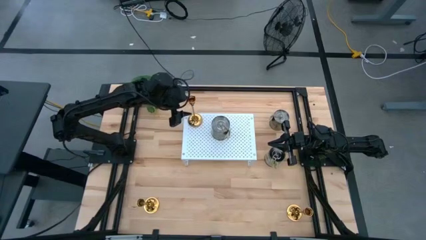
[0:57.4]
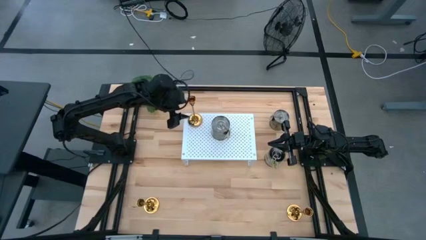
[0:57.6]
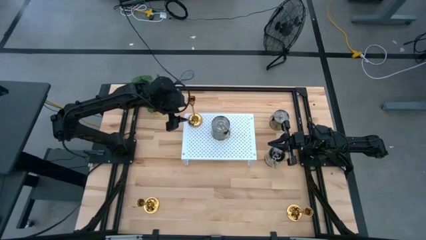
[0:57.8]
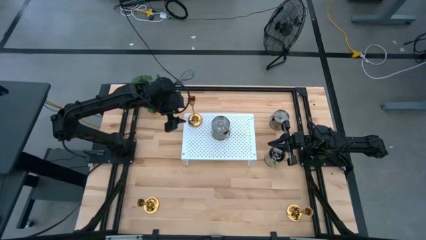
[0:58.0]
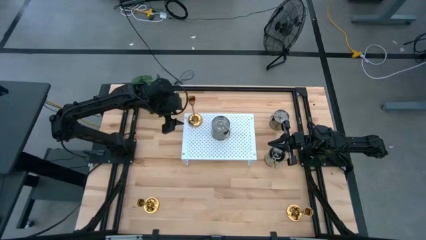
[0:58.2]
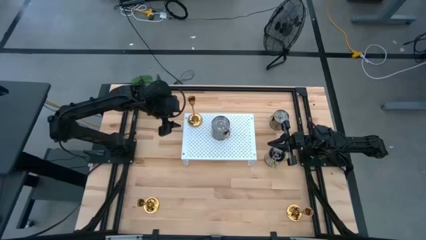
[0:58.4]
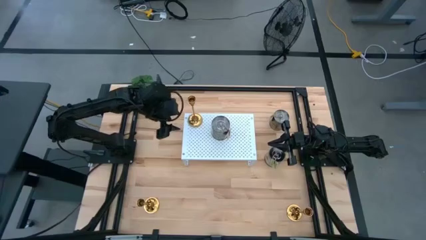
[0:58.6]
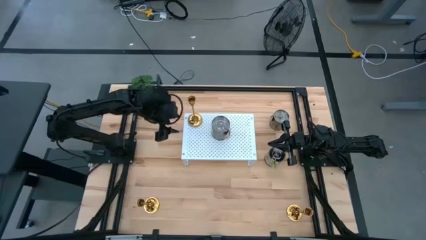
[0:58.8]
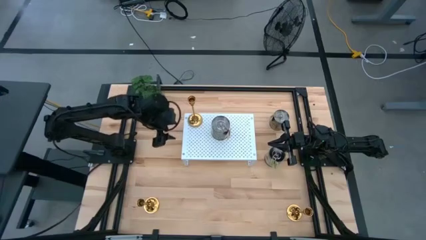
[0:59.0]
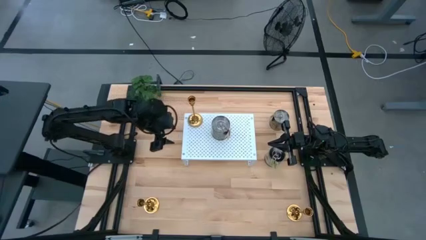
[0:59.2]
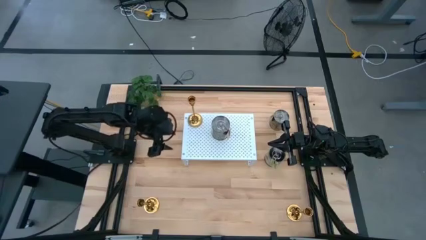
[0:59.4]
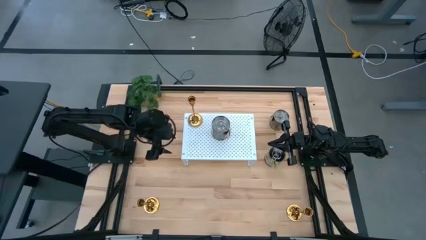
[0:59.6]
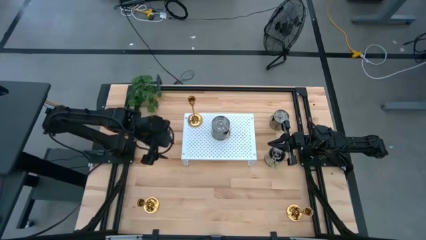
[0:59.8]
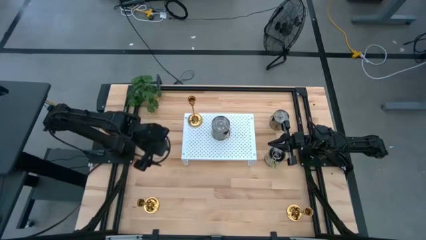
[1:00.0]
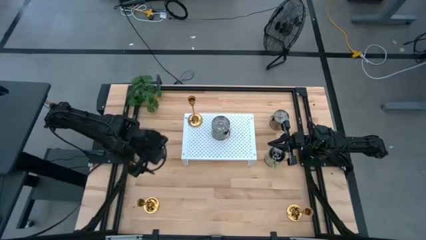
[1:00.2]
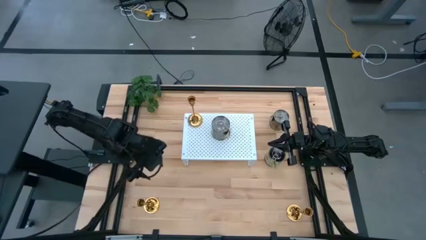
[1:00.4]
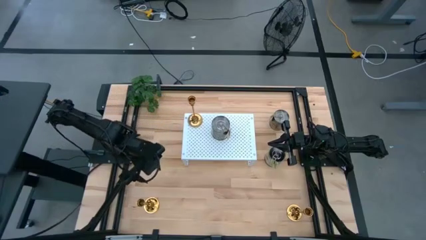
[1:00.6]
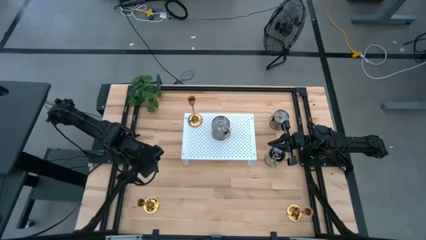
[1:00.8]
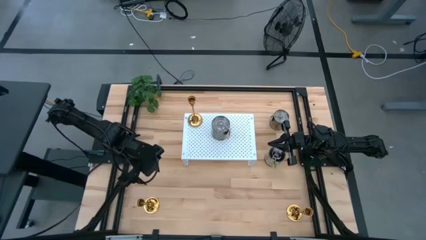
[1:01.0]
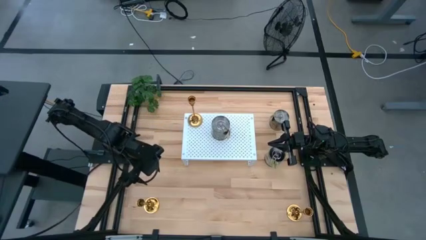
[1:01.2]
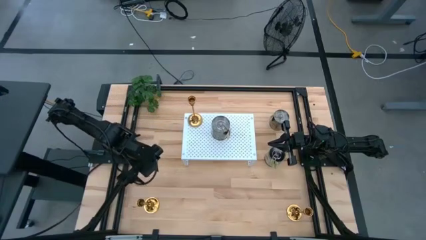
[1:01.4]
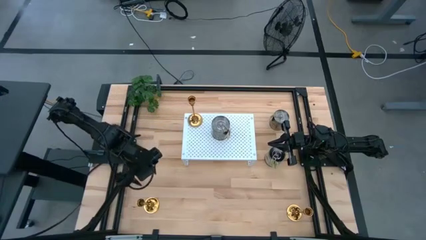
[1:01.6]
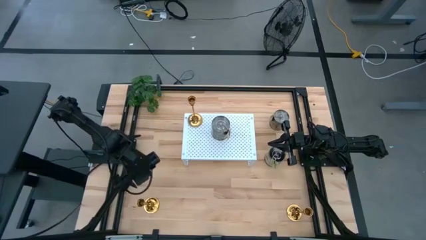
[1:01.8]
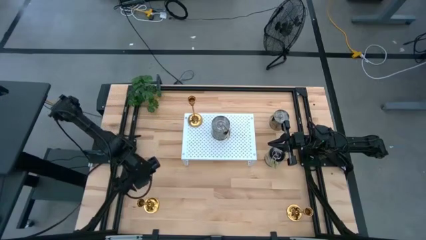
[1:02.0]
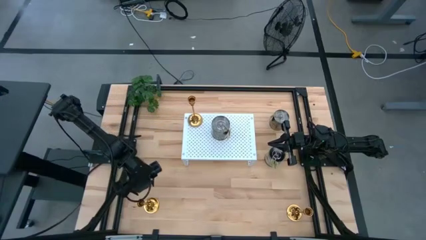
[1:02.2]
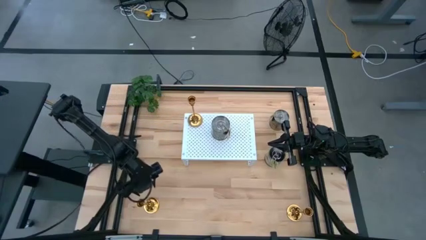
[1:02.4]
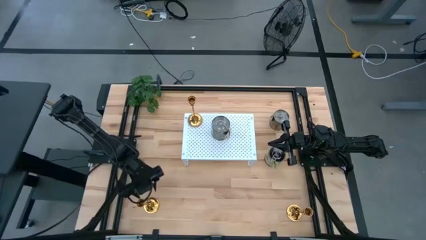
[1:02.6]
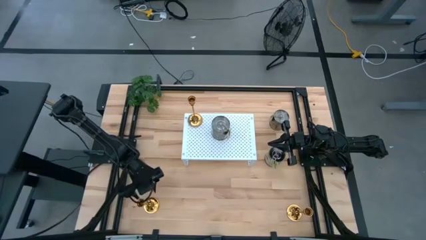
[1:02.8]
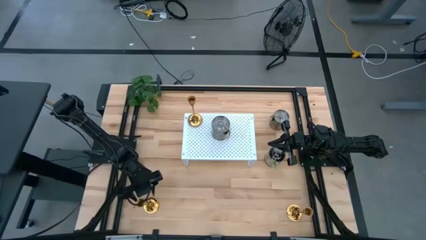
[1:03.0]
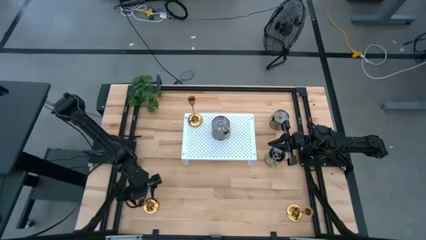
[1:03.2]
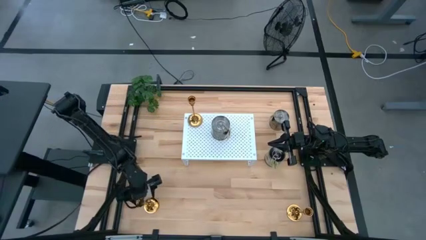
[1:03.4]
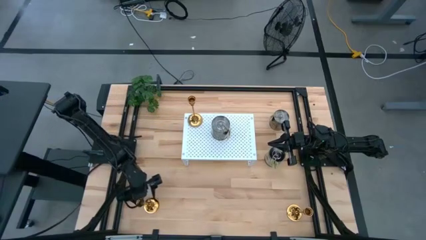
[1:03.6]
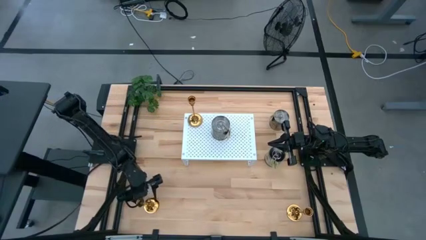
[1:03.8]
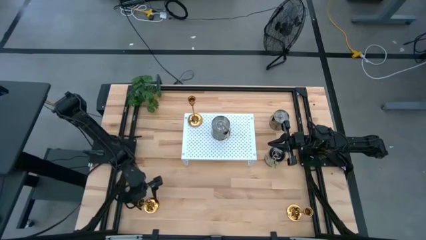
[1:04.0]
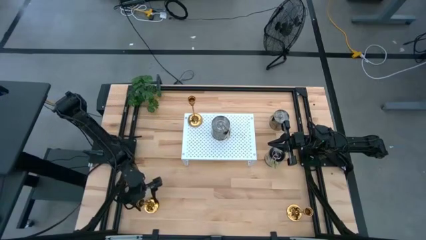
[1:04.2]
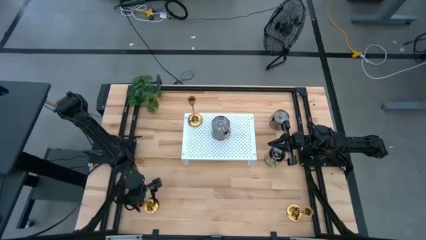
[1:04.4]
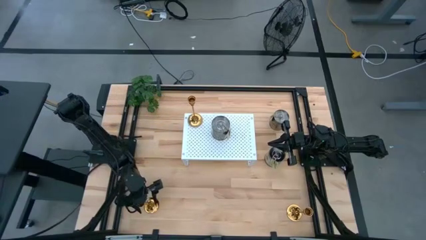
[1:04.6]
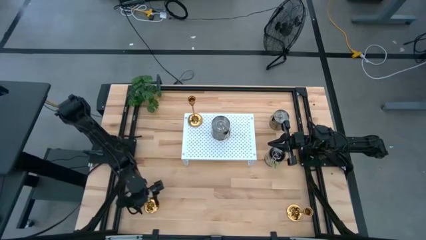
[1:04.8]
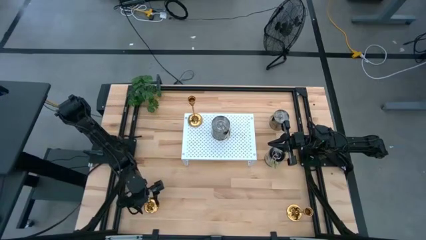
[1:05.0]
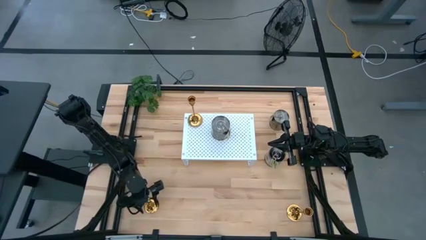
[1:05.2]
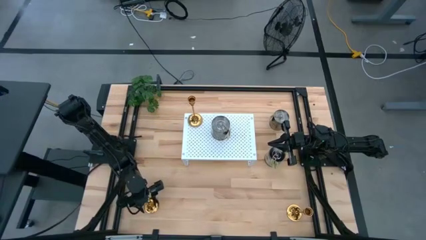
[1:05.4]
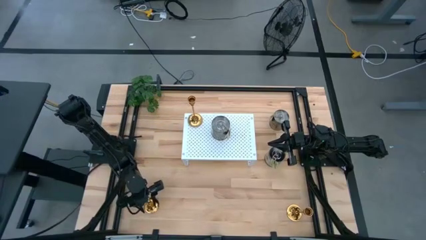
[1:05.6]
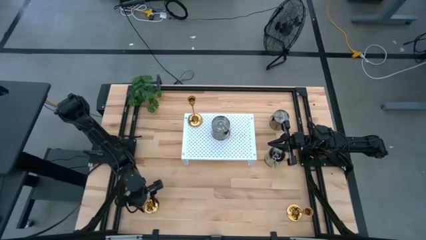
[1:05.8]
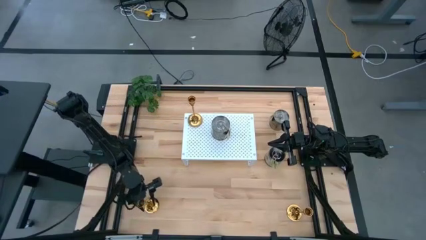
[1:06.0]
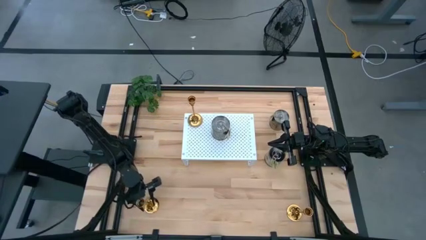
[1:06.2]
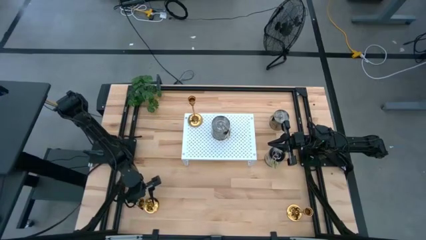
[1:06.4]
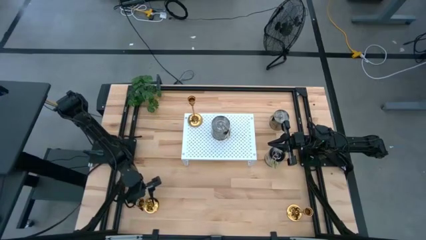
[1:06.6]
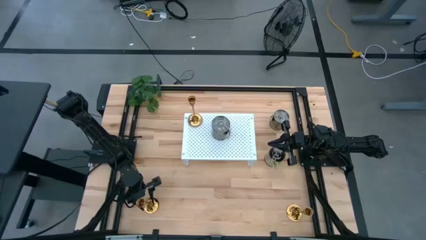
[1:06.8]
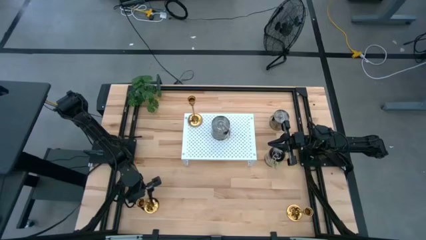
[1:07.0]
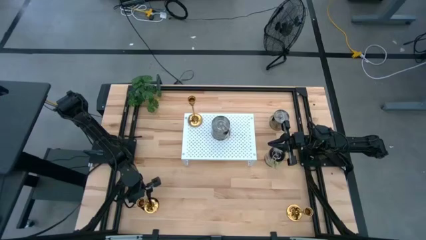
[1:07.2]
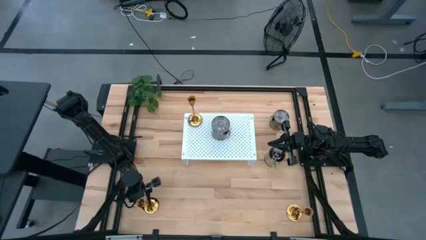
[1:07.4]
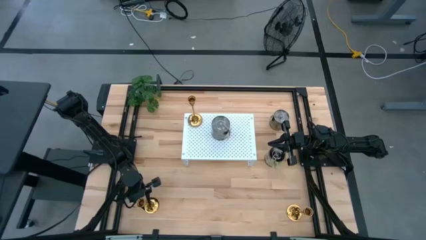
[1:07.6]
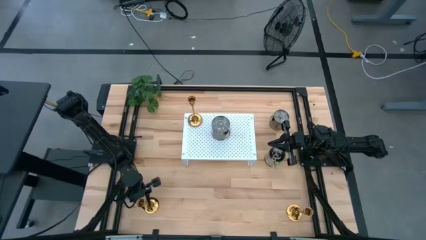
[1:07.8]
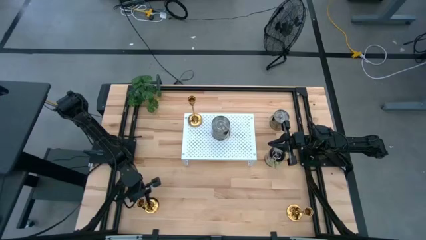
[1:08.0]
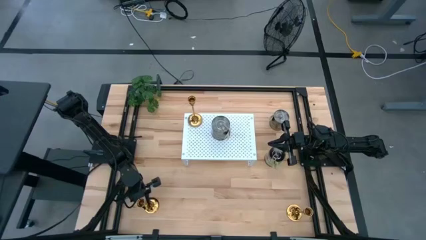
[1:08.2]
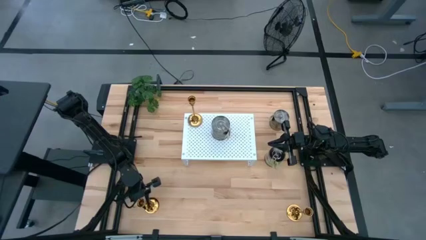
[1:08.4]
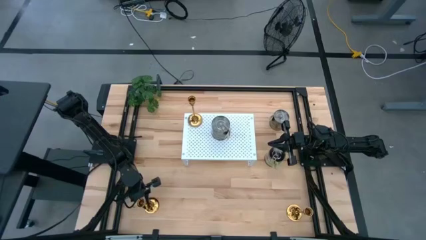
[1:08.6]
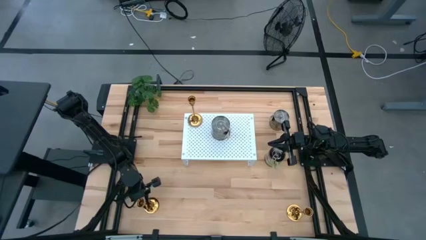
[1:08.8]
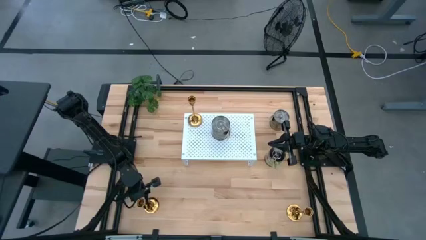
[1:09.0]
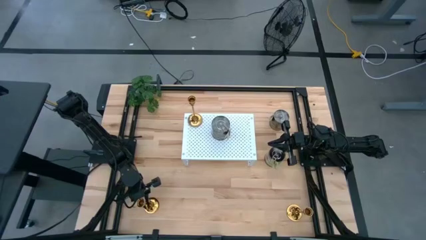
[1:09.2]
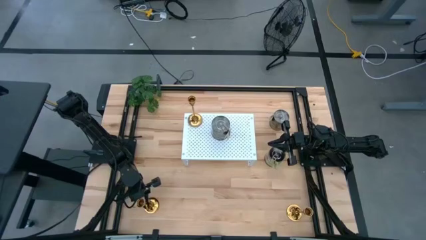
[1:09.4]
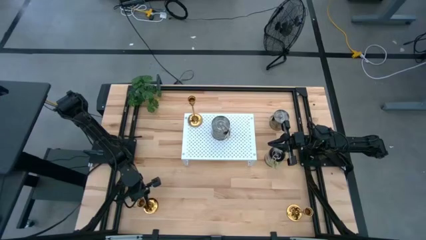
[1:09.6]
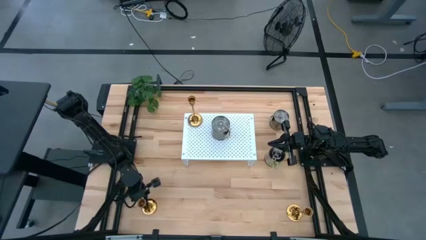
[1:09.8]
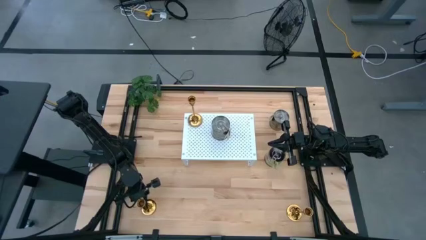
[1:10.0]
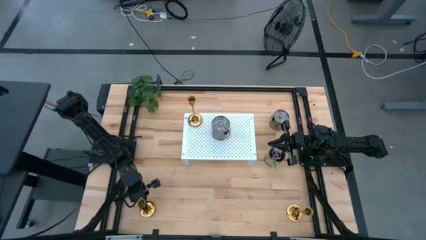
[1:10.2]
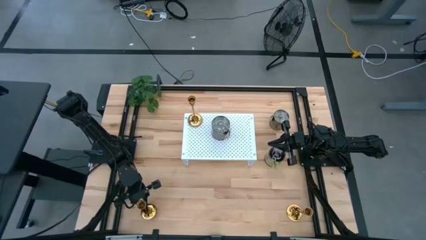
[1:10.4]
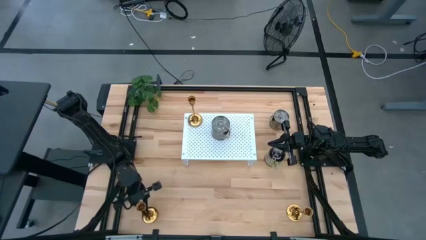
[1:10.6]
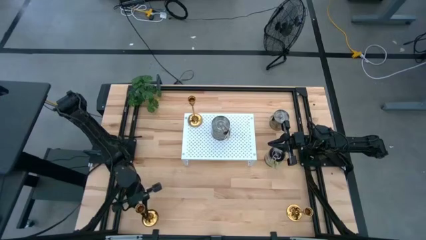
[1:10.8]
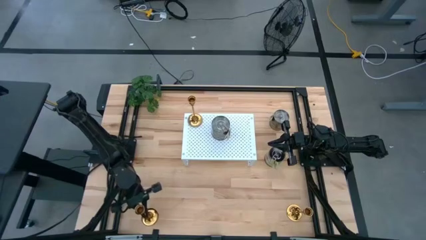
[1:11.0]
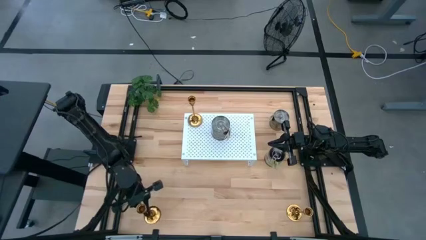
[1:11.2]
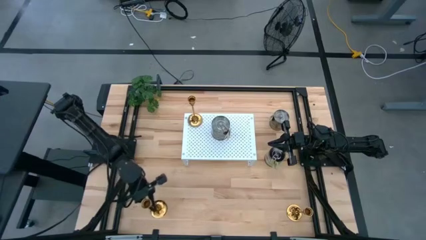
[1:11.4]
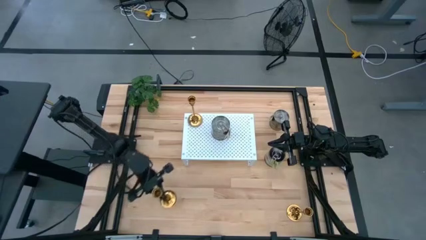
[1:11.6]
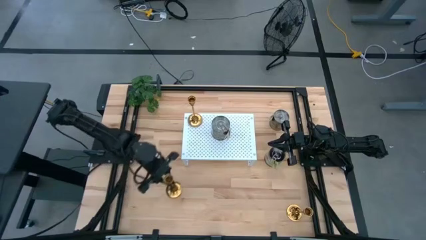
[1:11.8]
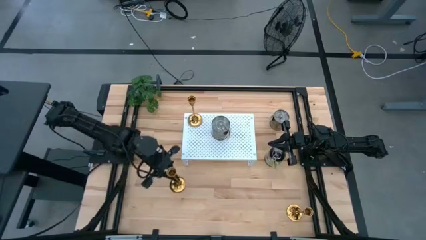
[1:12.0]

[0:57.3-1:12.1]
Task: Pick & Place candle stick holders
Put the left golden candle holder on the shelf aligned with the other golden candle holder

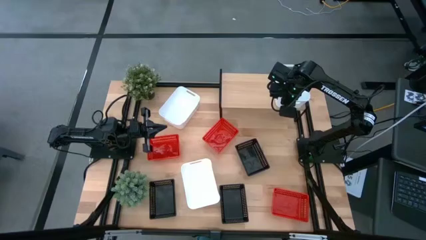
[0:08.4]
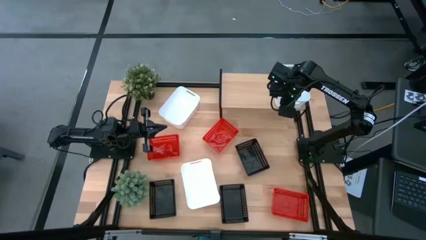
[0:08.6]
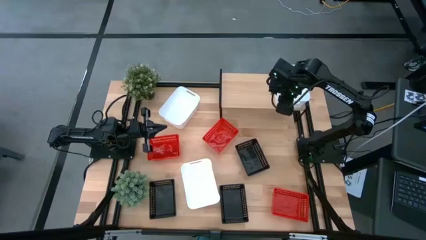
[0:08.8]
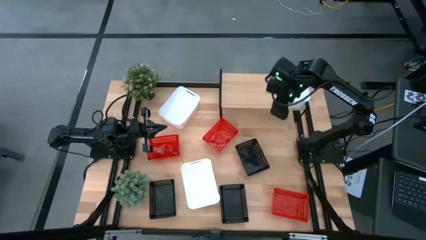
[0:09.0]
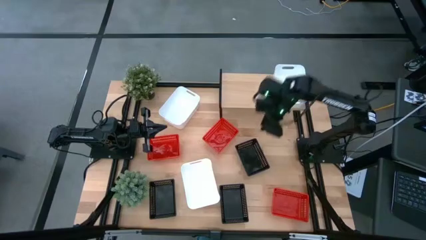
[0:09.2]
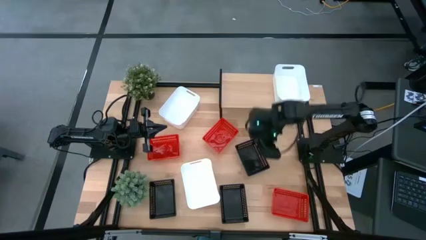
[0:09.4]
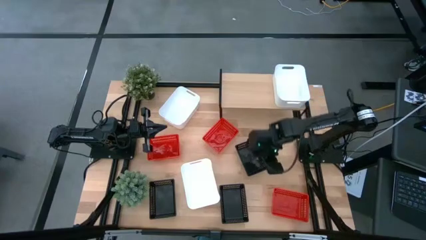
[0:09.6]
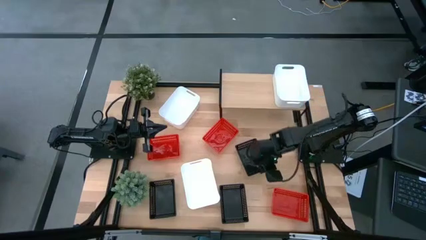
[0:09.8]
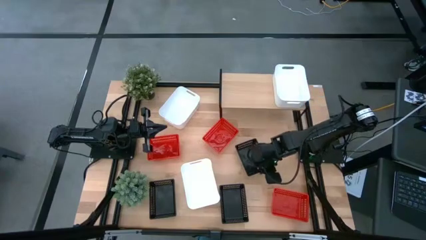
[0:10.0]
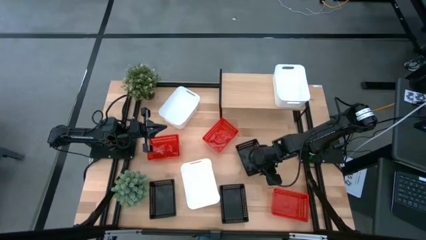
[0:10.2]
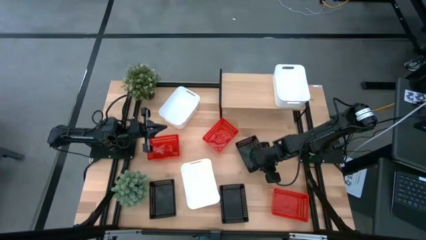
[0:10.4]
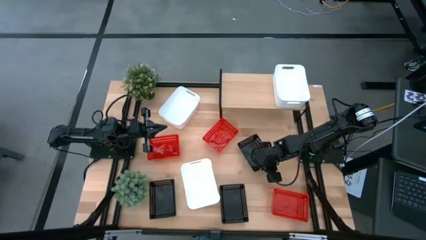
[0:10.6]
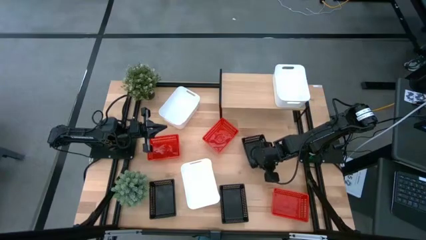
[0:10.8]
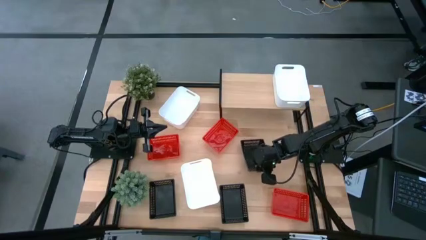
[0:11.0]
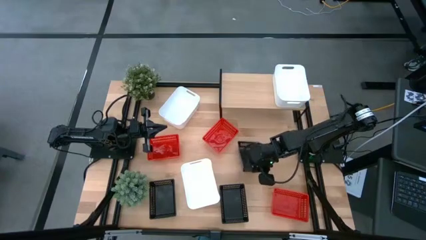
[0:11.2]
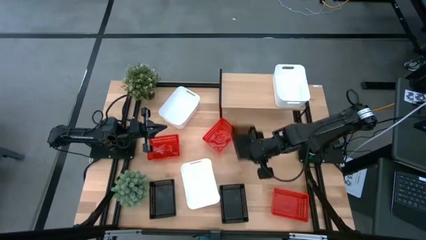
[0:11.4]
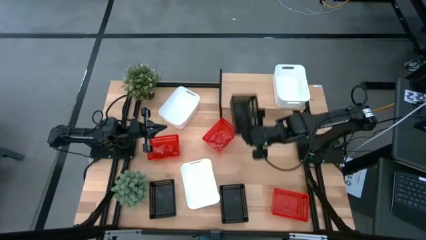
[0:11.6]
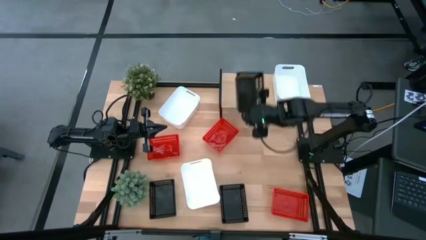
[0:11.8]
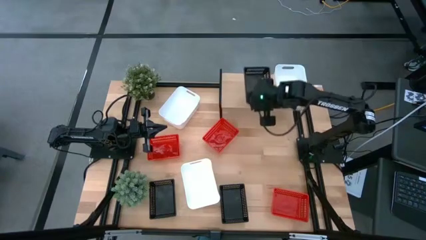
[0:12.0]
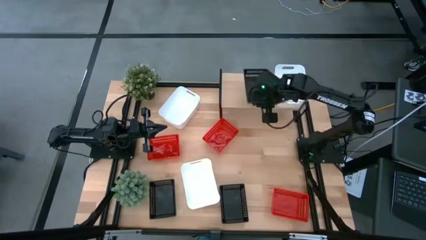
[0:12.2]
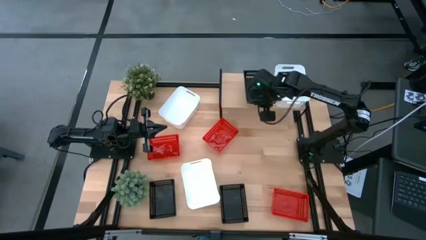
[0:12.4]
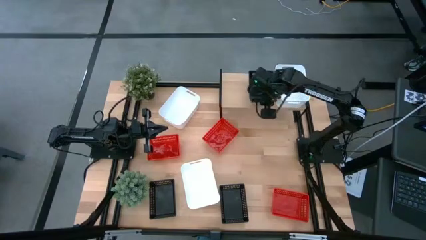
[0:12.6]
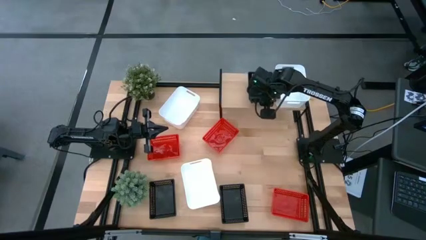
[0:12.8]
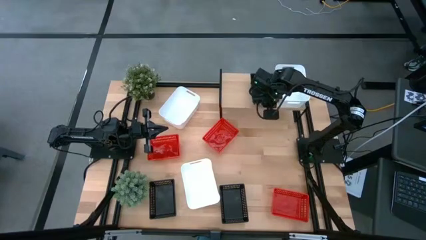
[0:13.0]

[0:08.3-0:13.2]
Task: Stack baskets on shelf by color
Put the top left black bin on the shelf
